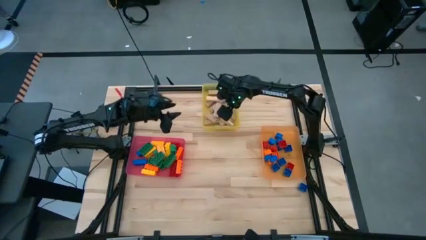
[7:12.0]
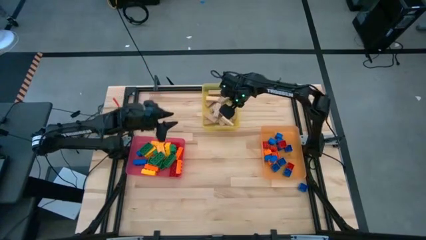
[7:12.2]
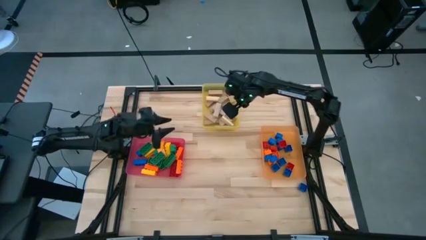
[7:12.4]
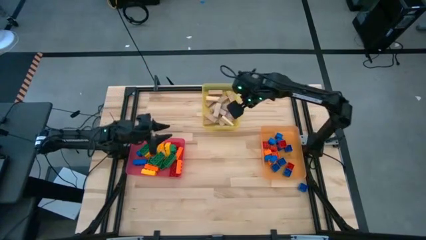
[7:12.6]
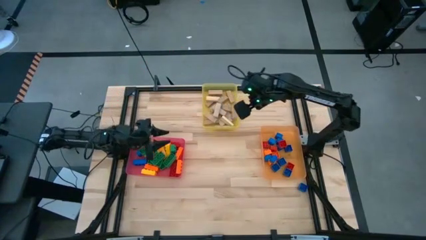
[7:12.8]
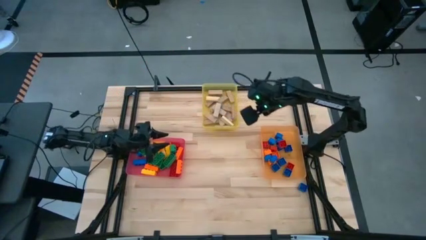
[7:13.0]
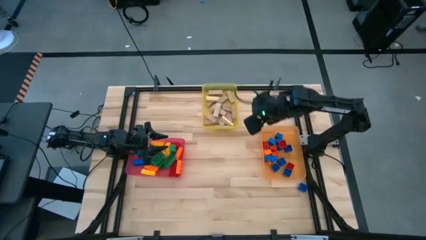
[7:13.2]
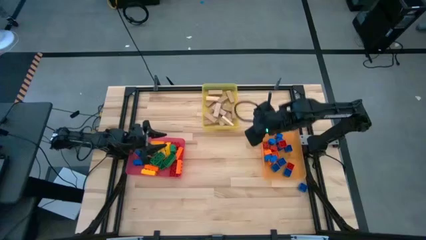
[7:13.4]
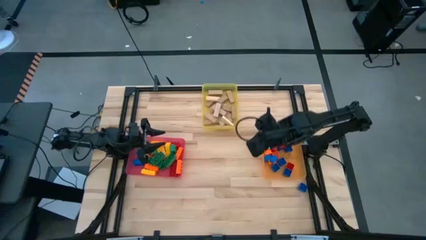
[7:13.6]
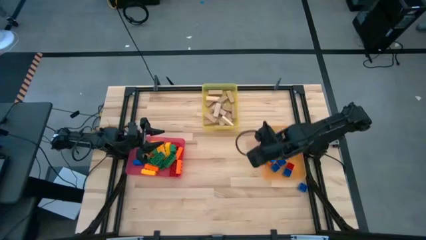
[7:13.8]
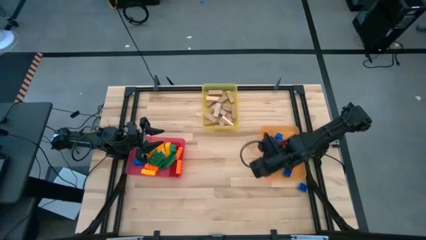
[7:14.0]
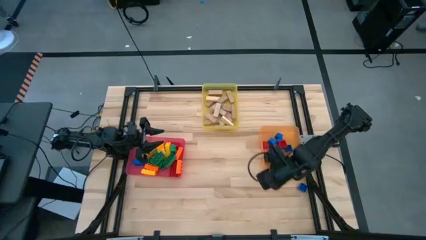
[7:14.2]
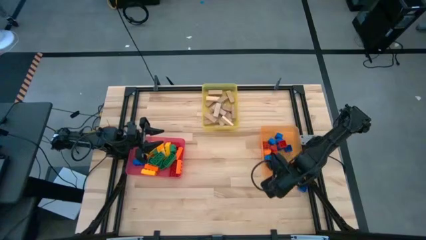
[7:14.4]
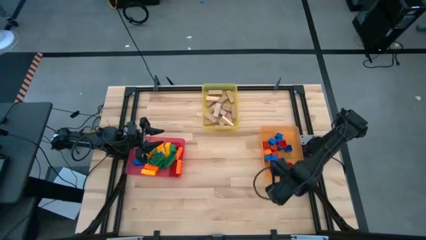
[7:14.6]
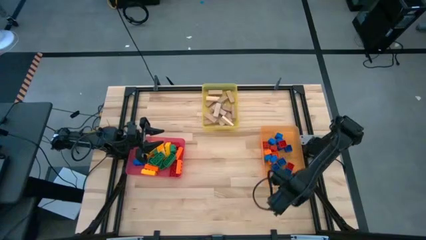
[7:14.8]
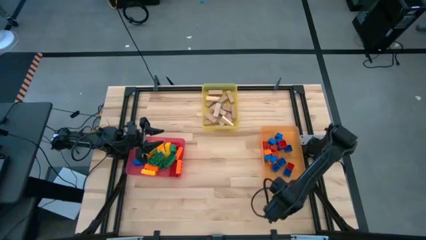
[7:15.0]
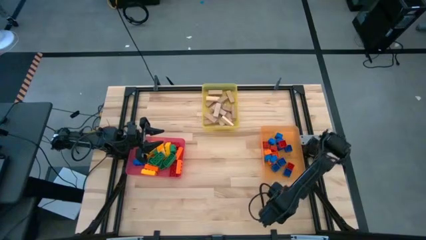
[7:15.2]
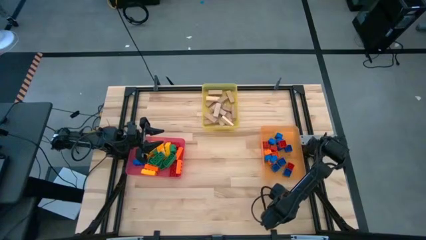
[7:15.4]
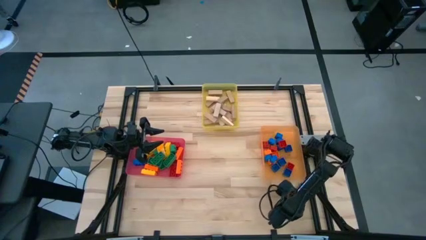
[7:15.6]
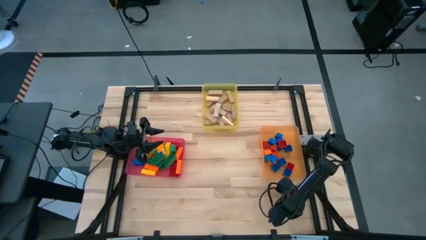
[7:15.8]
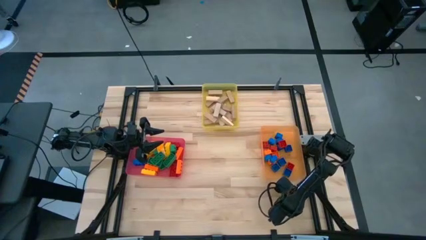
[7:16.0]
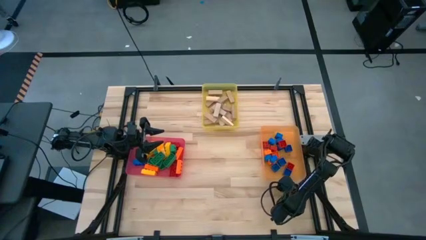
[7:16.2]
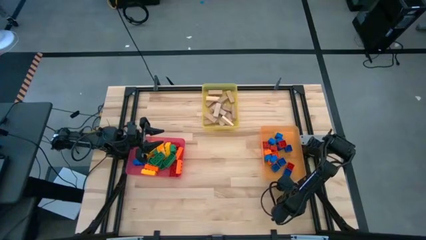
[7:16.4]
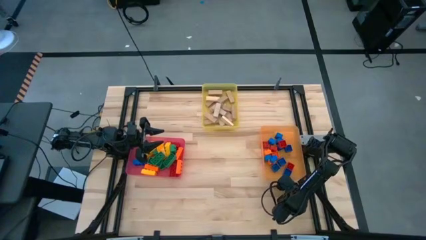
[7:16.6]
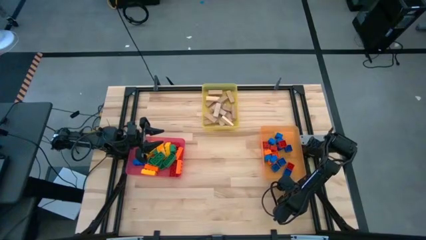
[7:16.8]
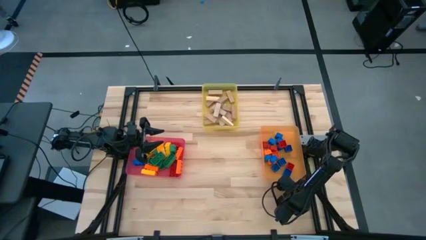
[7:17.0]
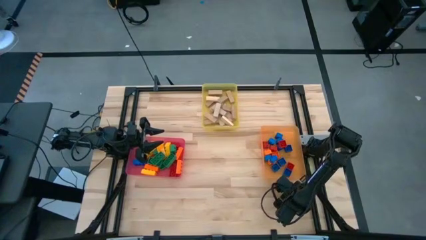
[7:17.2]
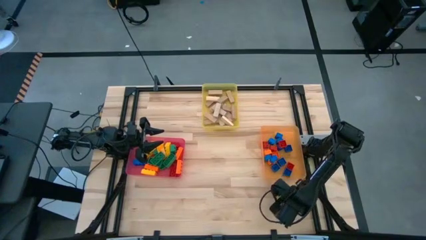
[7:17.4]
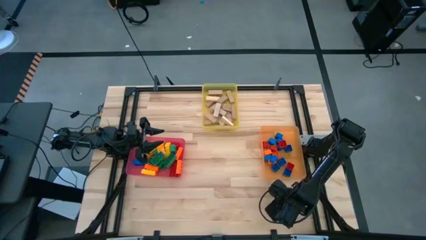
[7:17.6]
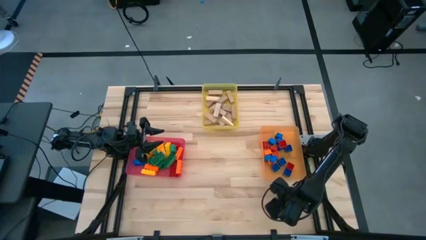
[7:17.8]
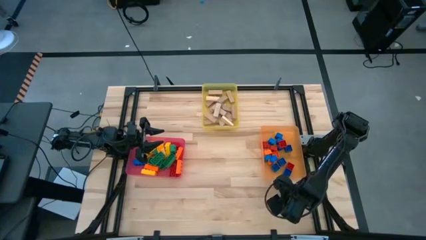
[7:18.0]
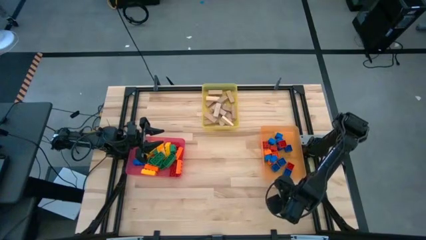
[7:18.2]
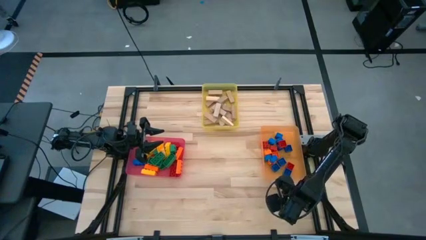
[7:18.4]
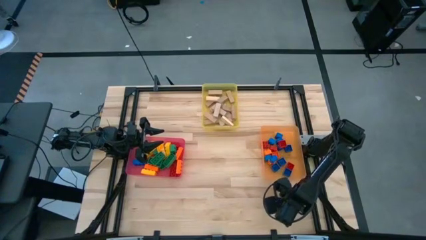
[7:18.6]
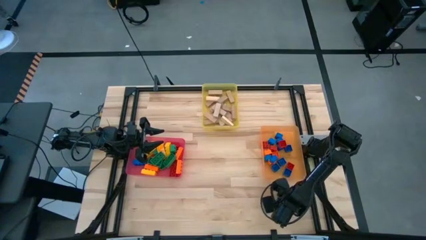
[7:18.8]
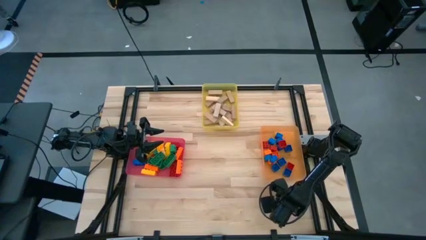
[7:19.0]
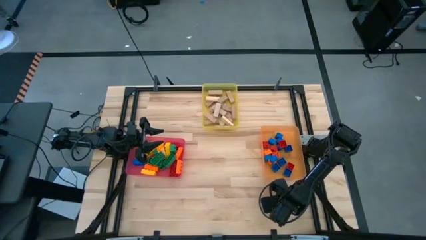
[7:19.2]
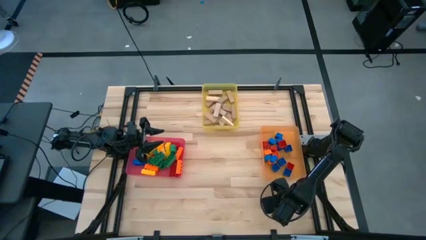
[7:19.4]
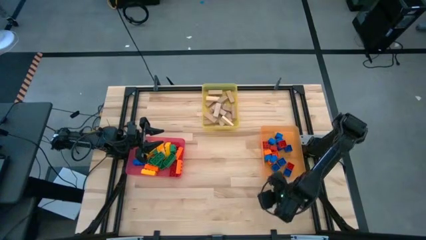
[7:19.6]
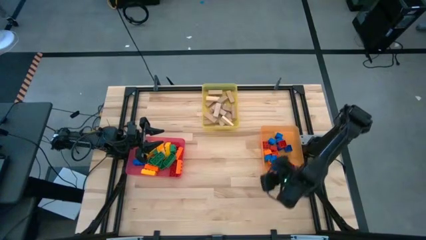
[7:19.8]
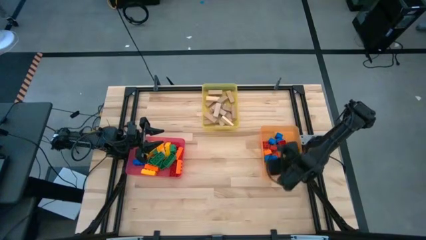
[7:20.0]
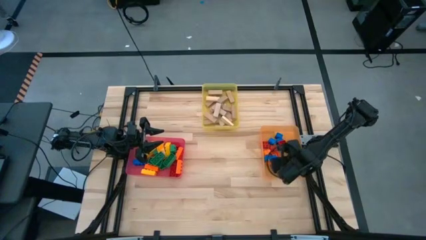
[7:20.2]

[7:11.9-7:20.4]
Task: Sort blocks by size
Put the 1 stud blue game piece into the orange bin

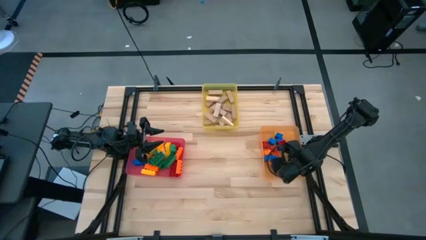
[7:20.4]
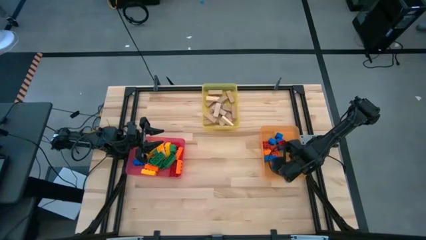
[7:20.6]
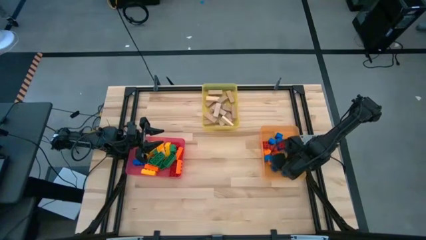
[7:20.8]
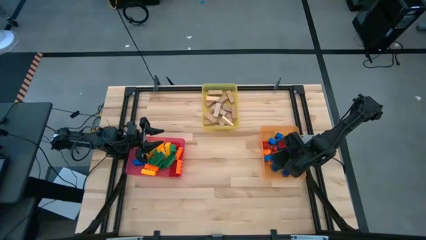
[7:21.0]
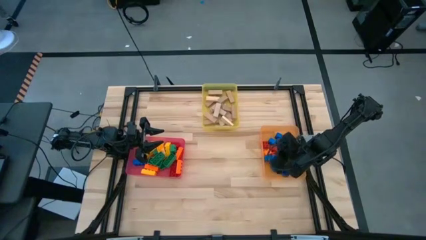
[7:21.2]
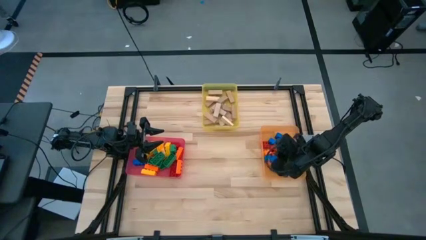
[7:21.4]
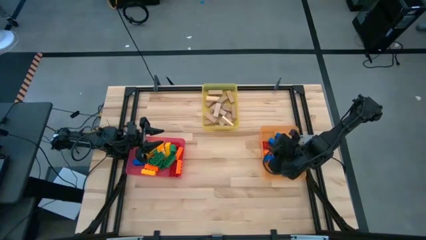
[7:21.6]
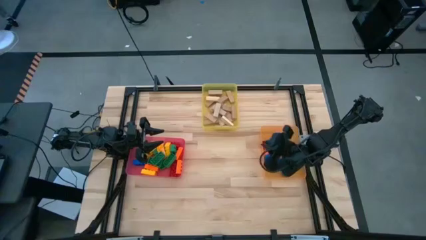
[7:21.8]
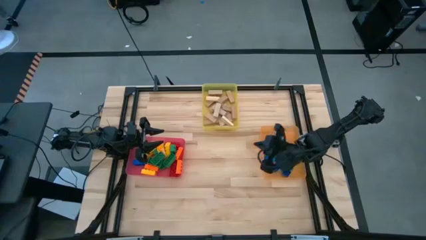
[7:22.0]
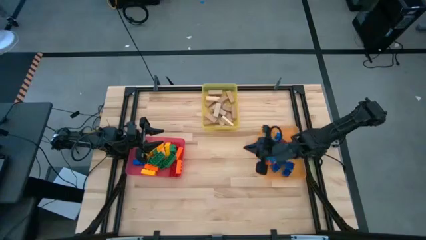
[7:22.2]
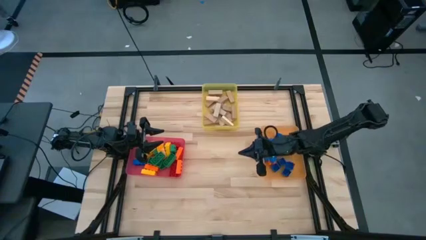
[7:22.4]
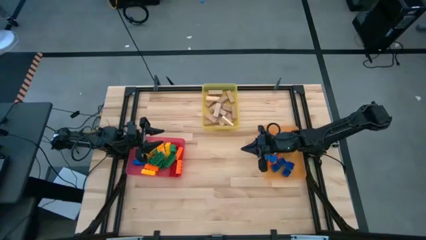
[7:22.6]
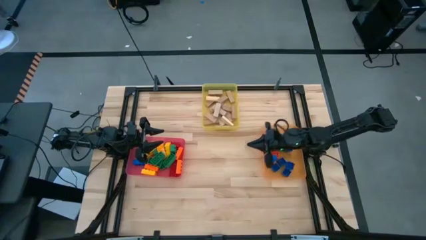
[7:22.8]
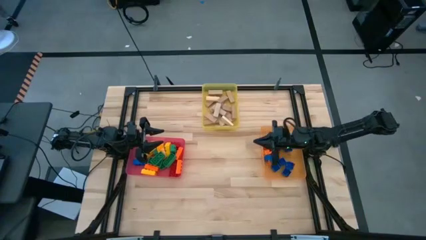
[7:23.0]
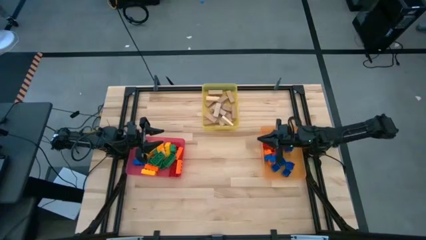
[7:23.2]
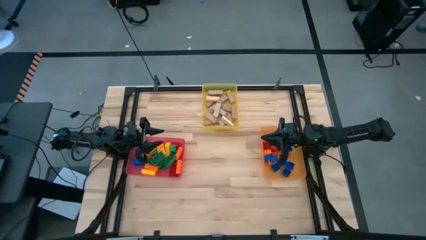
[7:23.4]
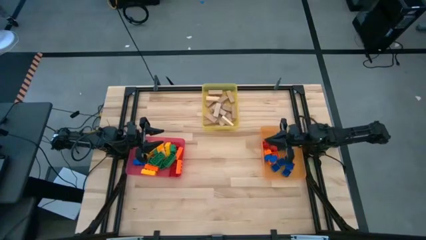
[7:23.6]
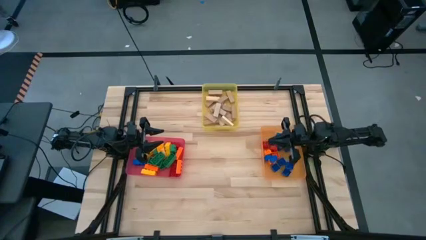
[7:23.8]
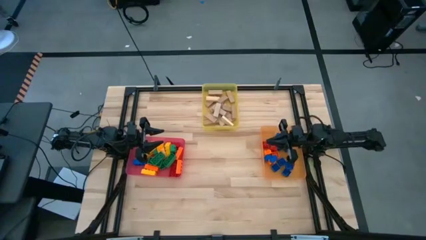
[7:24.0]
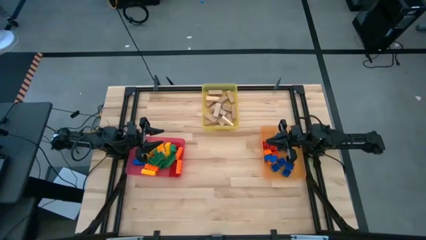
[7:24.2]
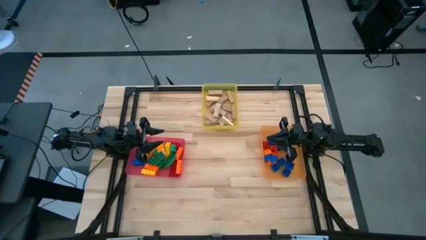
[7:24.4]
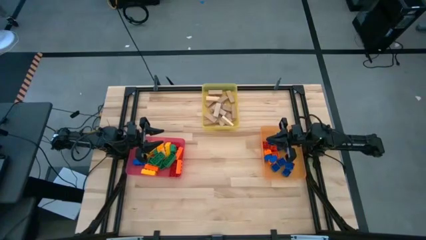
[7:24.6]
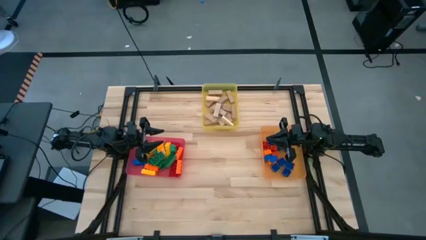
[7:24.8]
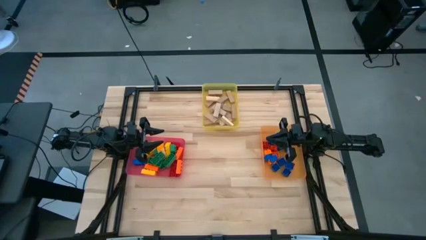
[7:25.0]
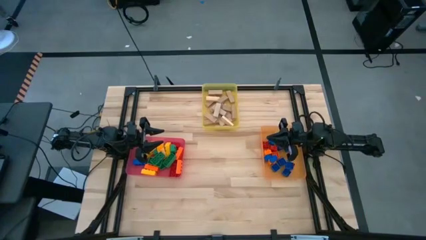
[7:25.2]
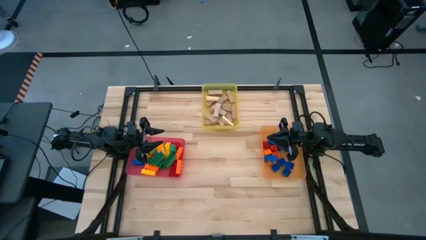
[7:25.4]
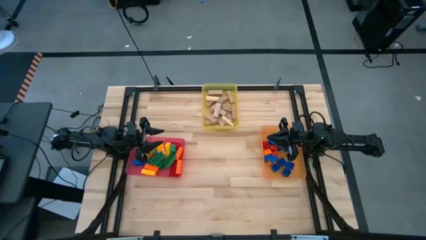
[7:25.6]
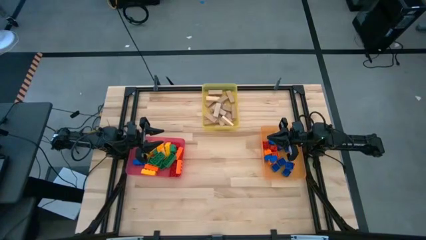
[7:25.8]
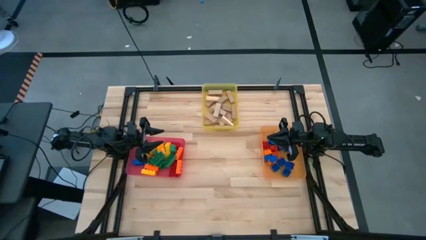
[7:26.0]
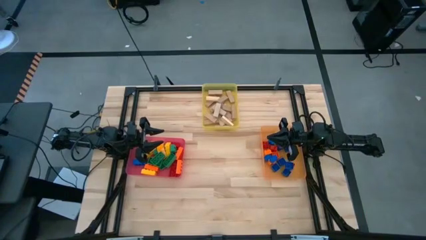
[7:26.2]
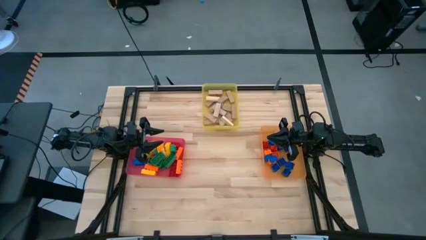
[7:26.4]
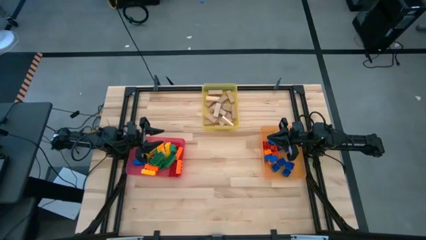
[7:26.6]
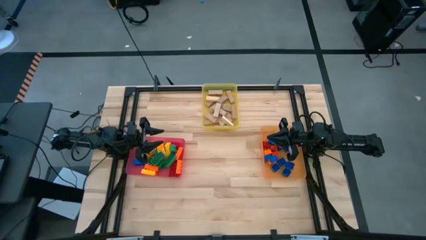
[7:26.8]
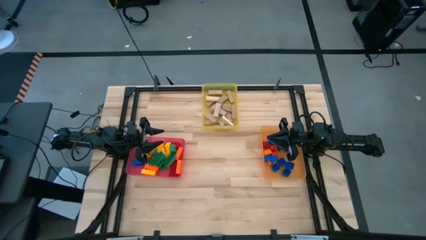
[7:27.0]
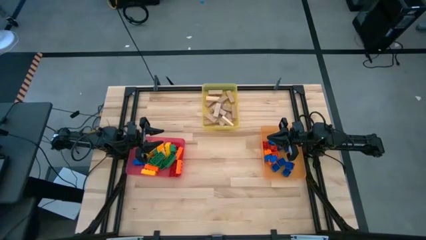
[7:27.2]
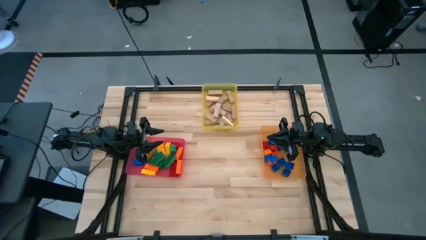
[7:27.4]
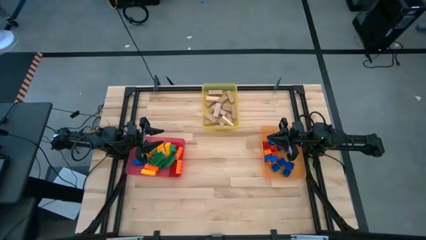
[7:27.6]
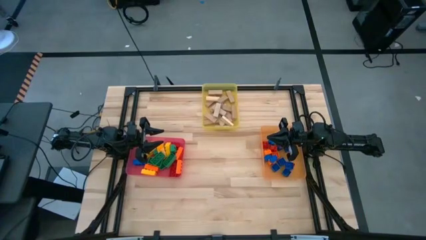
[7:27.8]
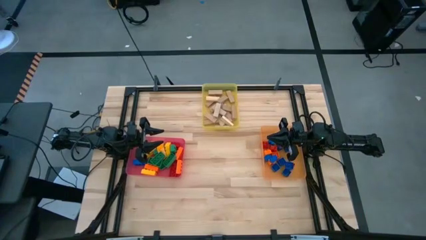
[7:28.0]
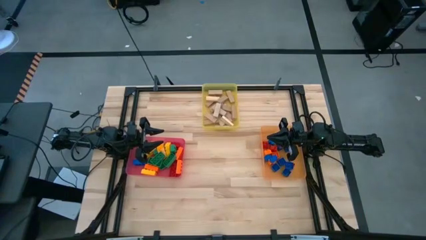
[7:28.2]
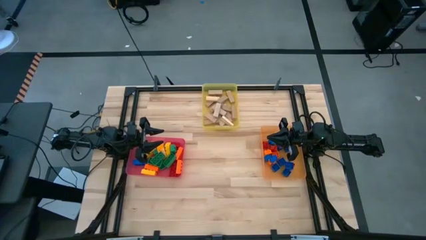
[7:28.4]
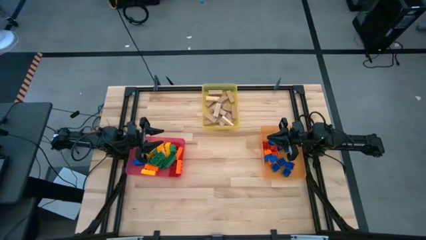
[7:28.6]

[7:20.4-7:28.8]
Return to Home Position
